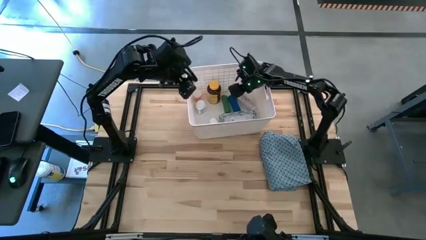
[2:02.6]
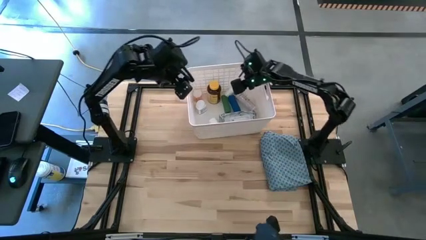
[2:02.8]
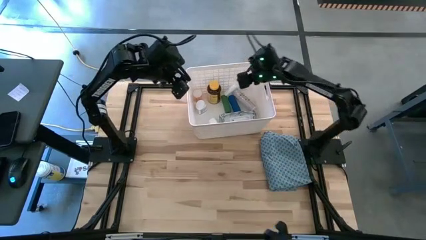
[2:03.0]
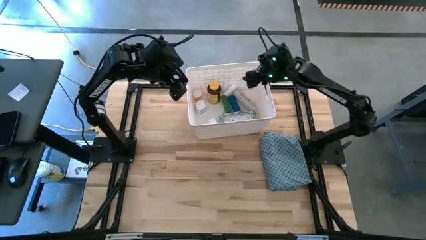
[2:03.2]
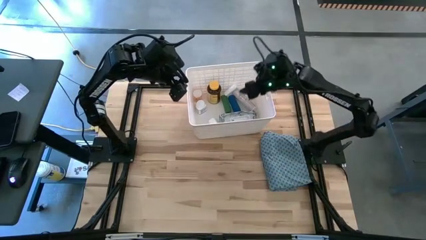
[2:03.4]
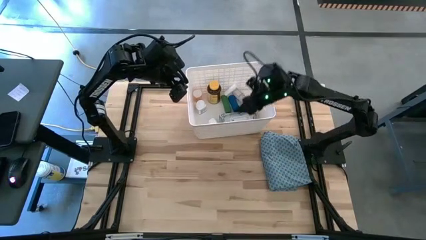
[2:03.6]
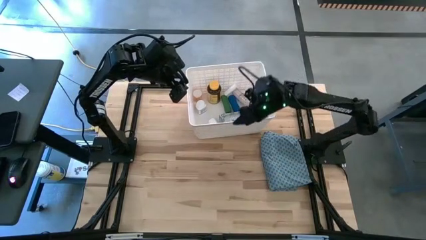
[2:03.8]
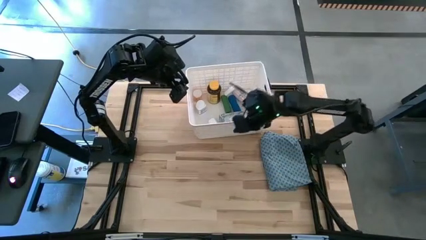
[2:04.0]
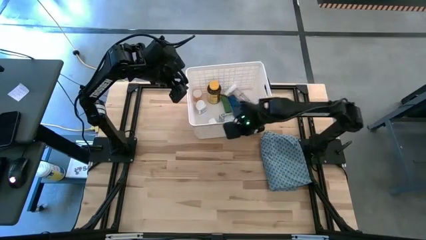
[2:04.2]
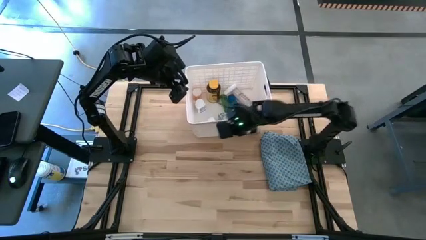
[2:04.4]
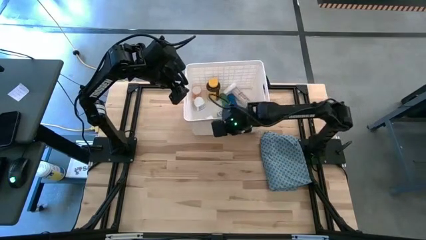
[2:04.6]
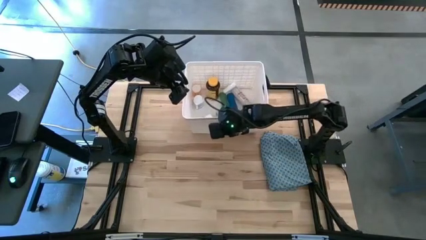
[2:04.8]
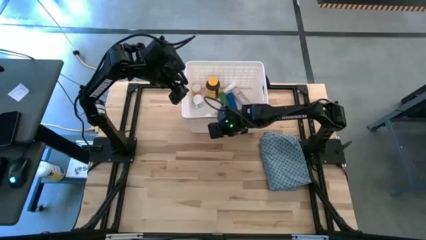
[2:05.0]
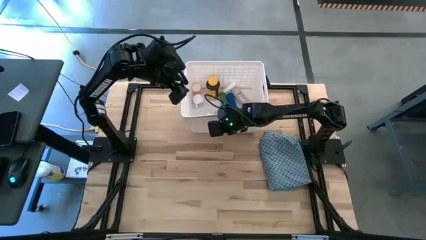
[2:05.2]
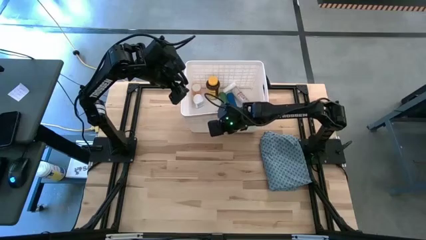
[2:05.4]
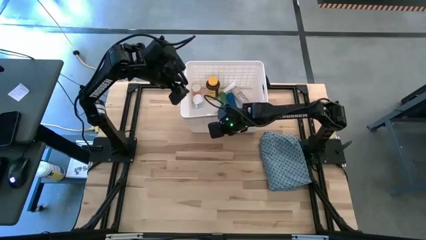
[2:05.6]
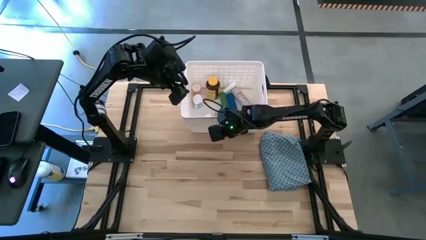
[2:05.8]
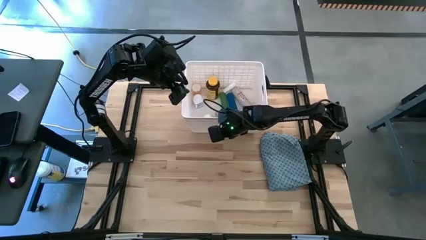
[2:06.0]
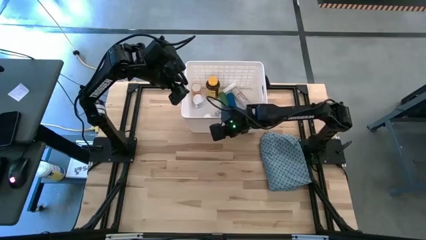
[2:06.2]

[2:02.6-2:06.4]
Task: Pick & place medical supplies in basket/bin
Adjust the white bin

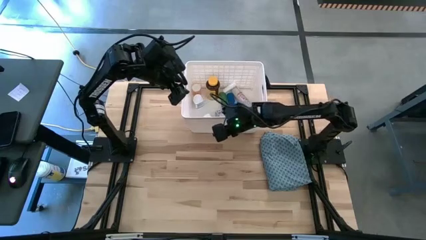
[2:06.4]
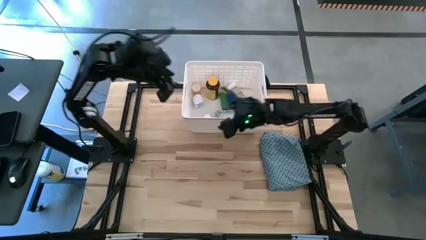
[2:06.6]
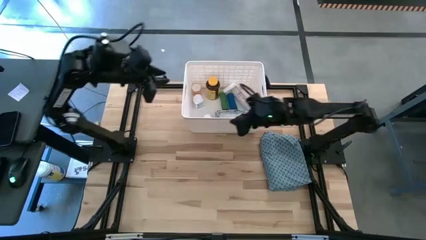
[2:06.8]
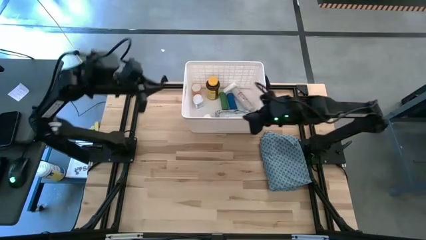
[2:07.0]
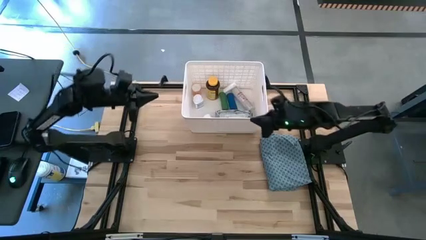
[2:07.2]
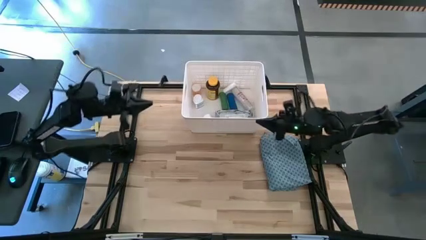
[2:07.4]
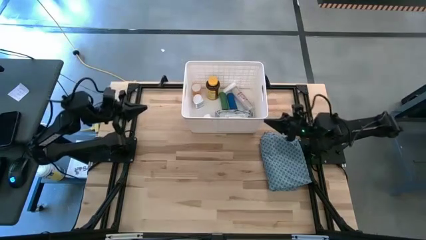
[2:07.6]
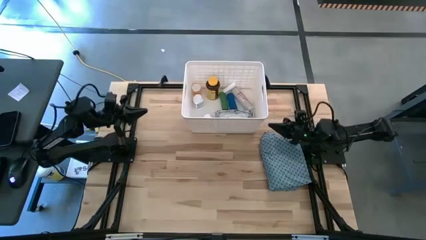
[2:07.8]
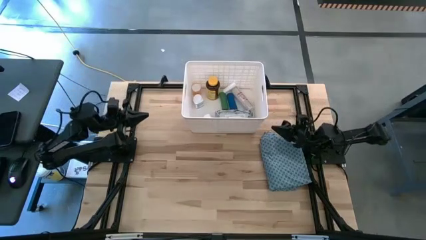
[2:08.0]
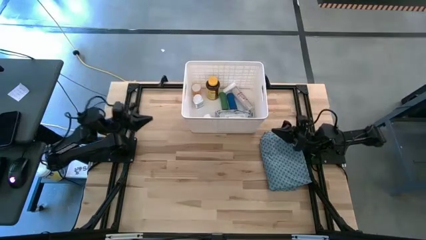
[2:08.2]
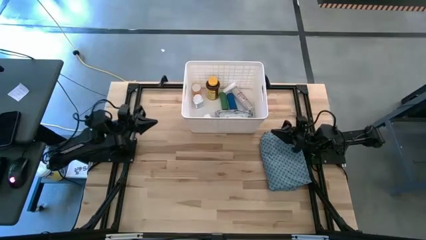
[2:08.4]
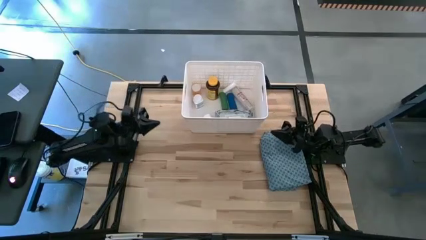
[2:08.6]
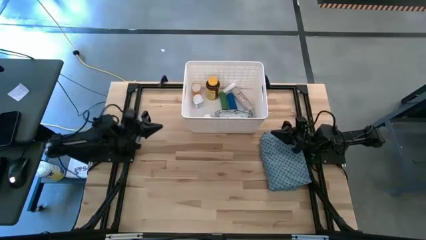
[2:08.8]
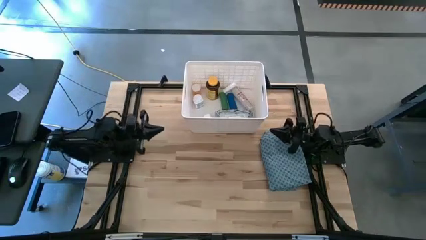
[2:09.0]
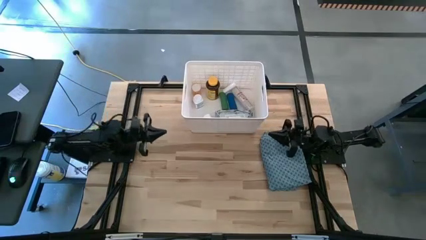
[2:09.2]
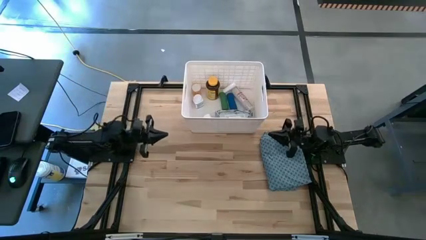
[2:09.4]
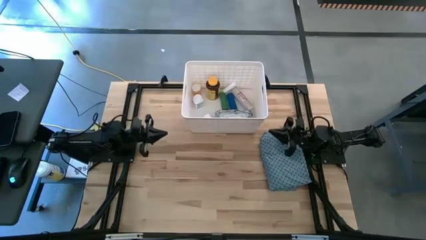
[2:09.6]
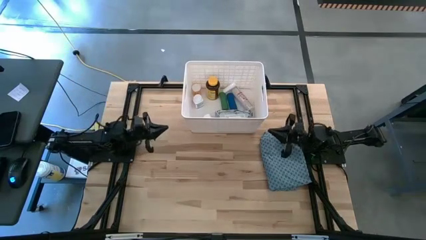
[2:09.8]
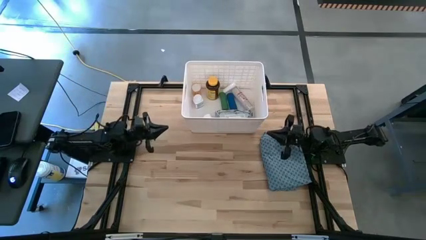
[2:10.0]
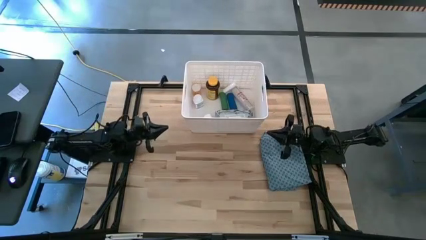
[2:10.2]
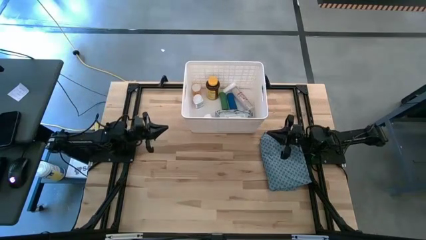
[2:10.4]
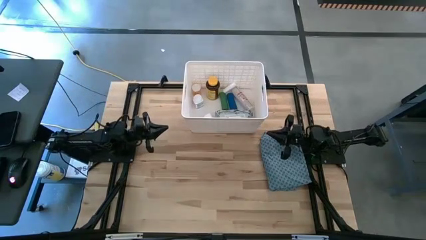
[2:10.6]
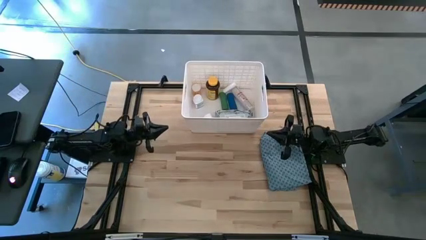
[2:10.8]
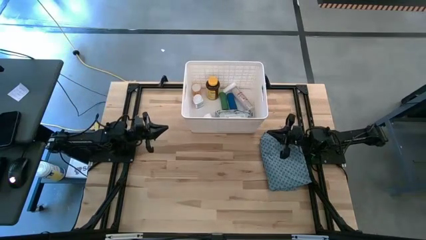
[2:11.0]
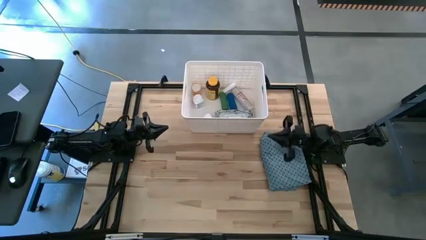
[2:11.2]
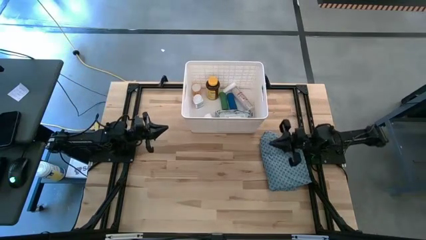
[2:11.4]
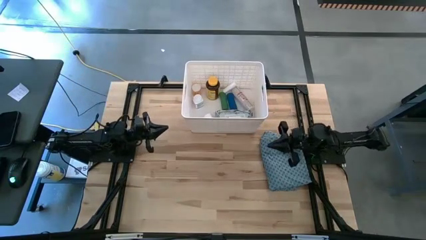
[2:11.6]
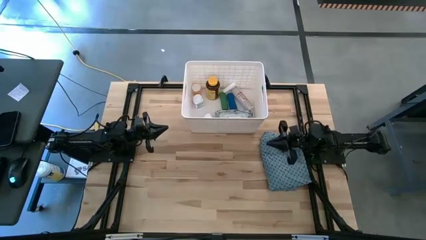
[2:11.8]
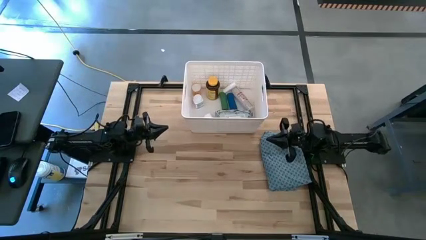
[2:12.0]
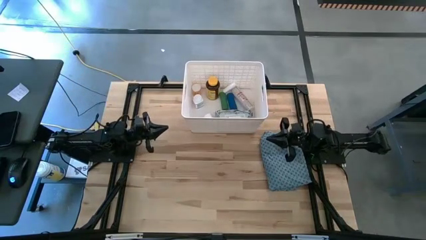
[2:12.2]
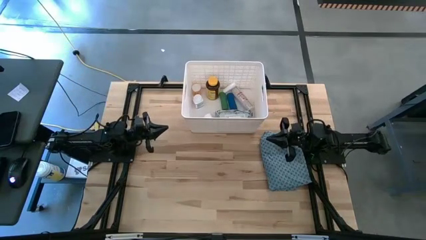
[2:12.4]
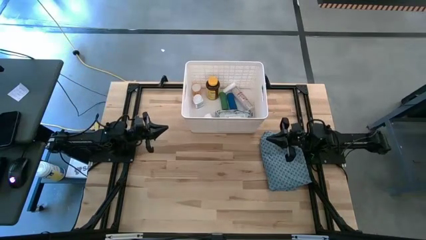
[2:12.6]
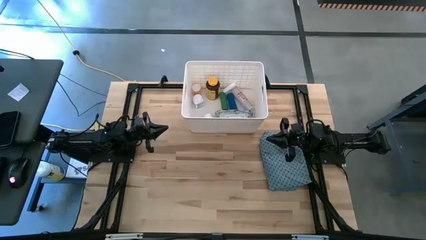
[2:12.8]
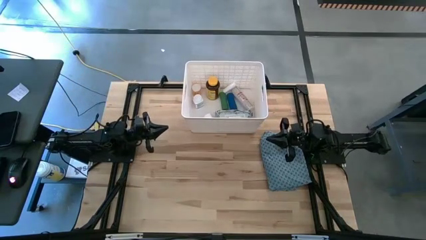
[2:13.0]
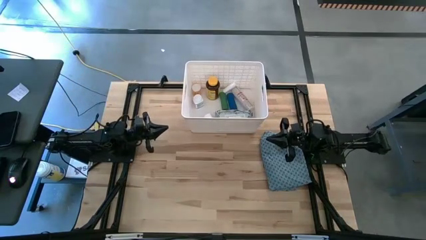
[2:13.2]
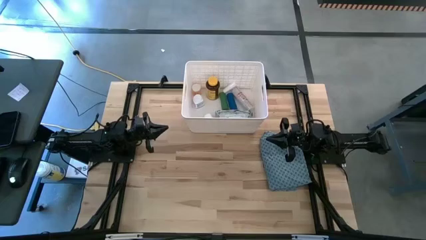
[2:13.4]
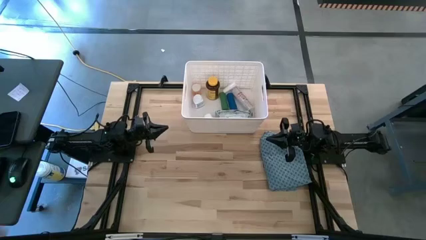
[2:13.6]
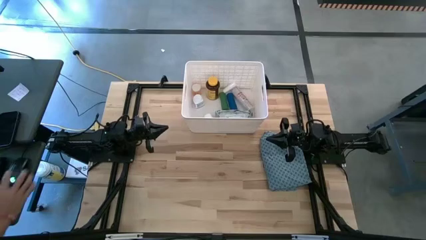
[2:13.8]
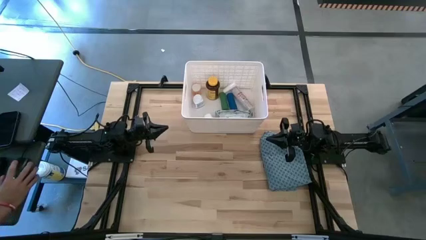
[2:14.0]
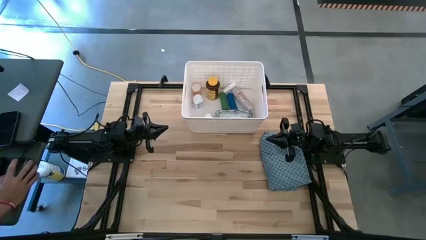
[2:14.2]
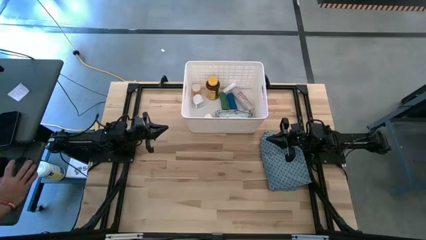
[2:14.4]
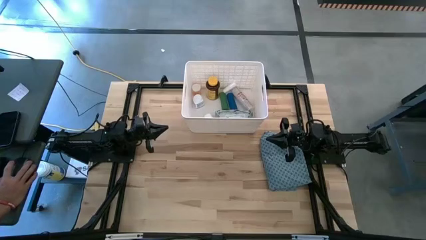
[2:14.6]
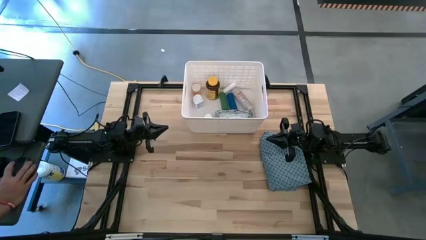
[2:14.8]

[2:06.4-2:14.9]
Return to Home Position

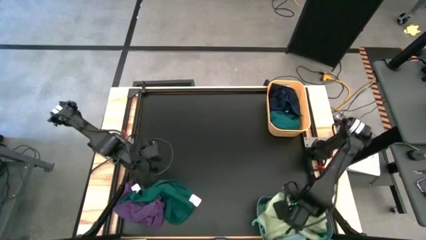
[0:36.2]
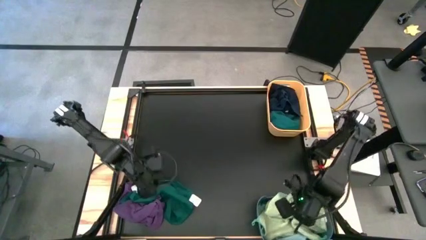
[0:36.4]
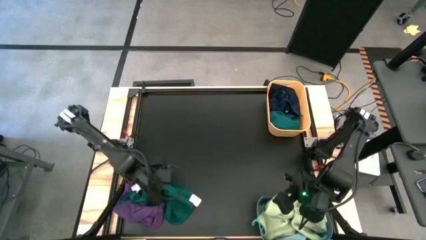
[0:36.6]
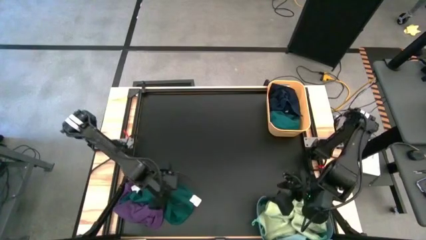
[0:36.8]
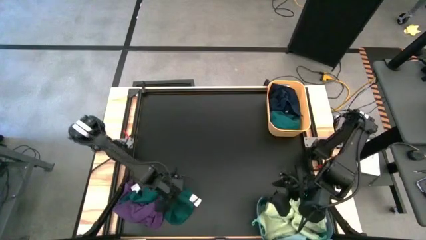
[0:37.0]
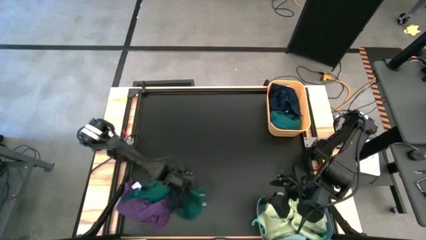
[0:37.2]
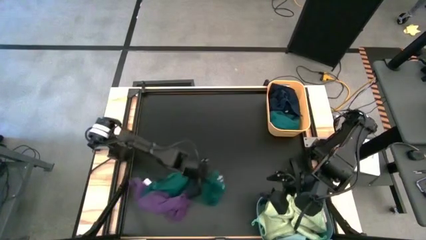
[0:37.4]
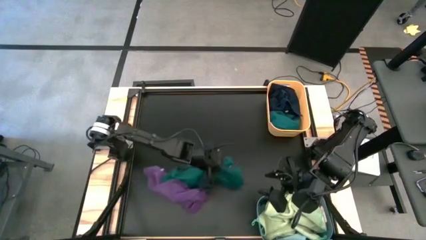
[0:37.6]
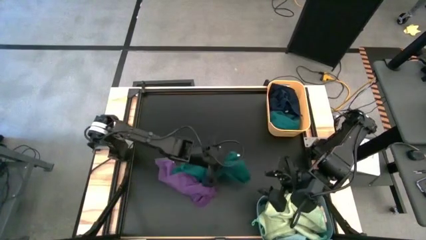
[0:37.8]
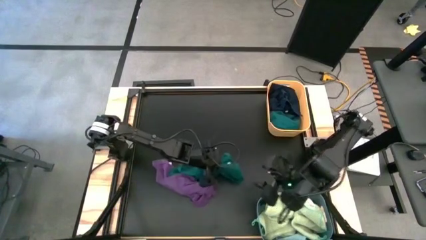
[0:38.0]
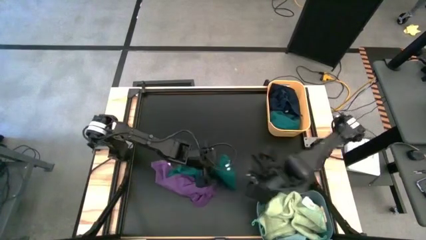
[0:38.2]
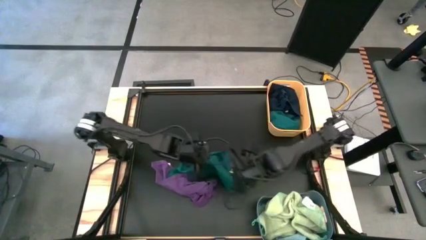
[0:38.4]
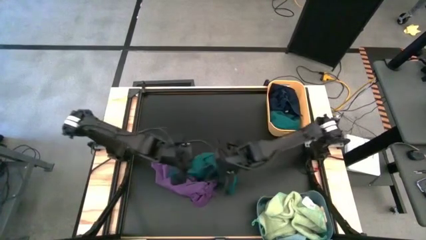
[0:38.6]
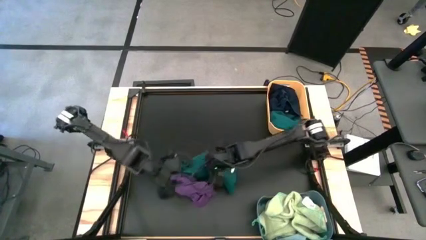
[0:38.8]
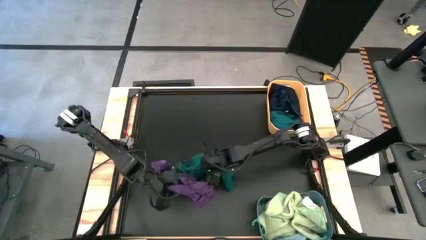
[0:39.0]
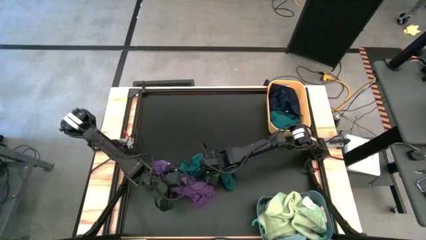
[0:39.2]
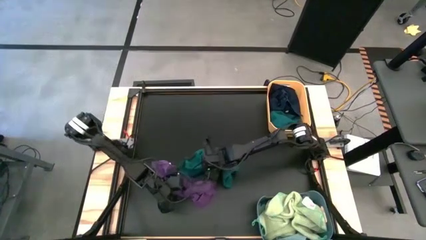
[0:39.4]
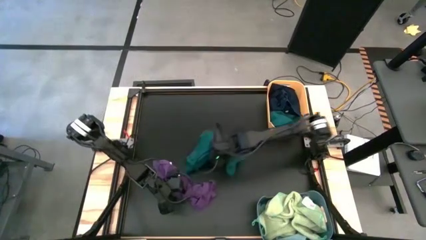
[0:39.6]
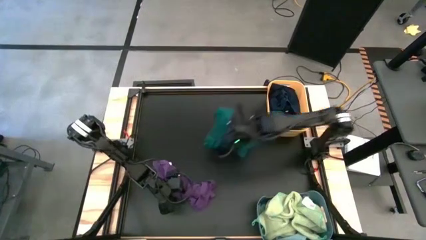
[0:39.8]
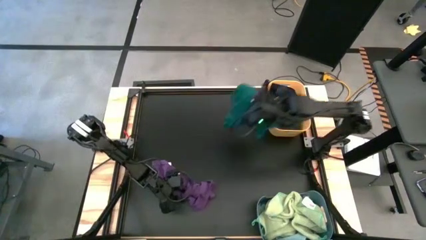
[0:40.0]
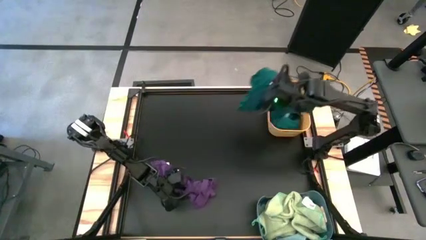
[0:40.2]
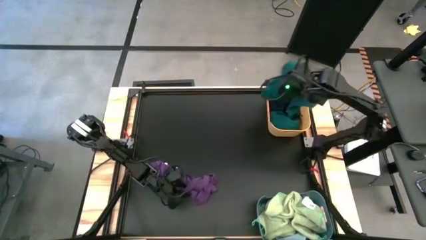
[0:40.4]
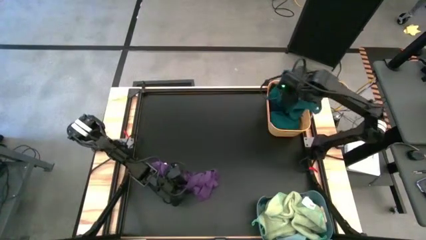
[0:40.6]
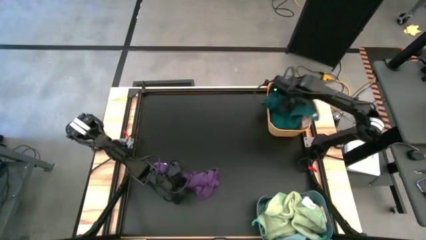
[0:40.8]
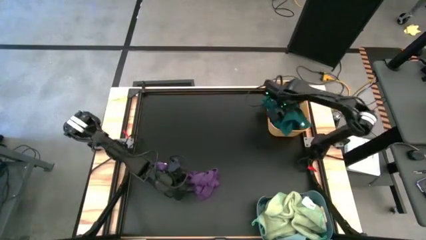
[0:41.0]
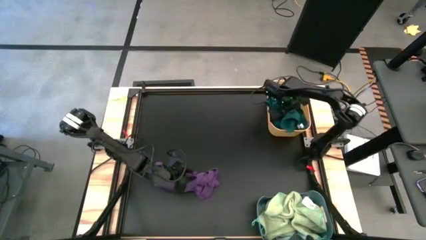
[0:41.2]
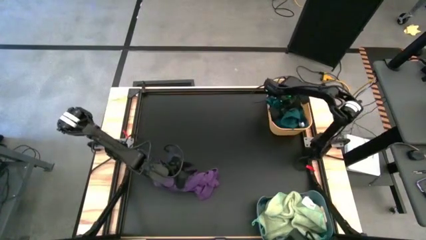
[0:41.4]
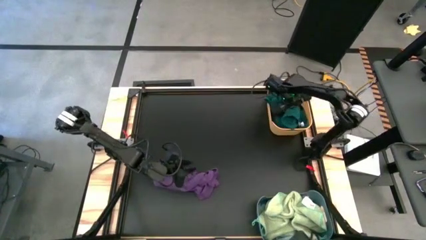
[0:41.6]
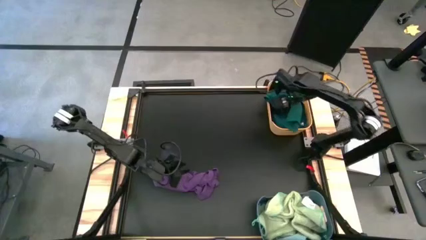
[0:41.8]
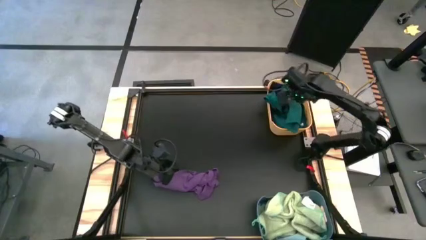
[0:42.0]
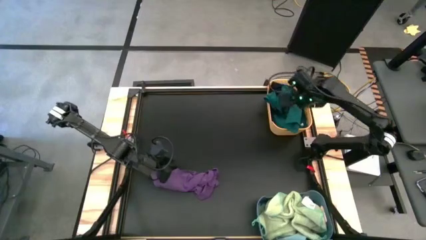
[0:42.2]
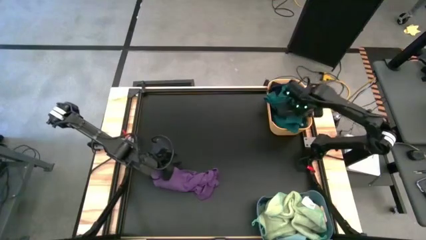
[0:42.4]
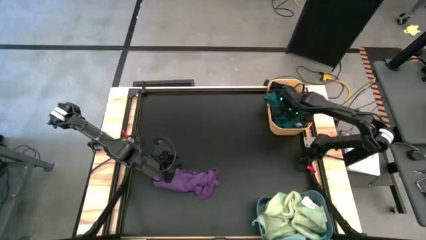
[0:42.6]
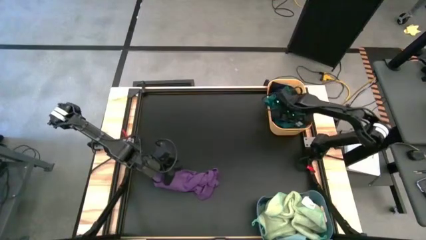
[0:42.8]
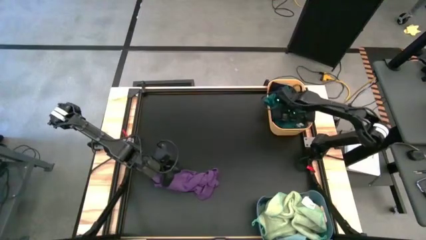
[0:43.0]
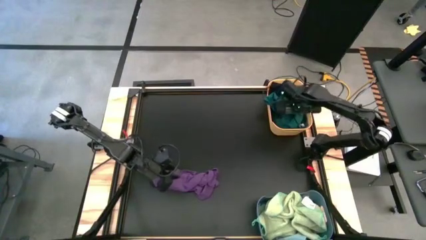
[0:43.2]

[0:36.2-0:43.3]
Task: Sort towels by color in basket
Put the dark green towel into the yellow bin
